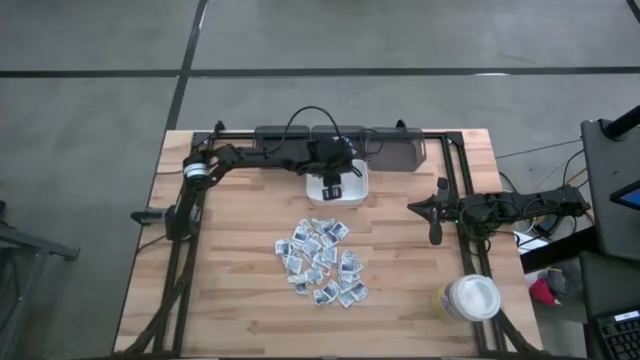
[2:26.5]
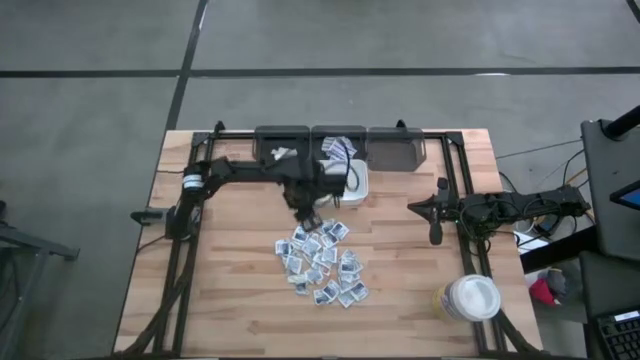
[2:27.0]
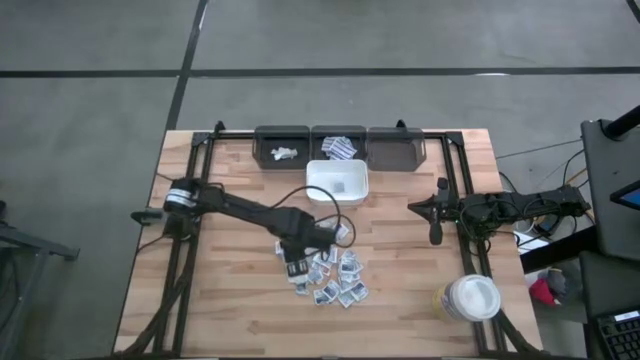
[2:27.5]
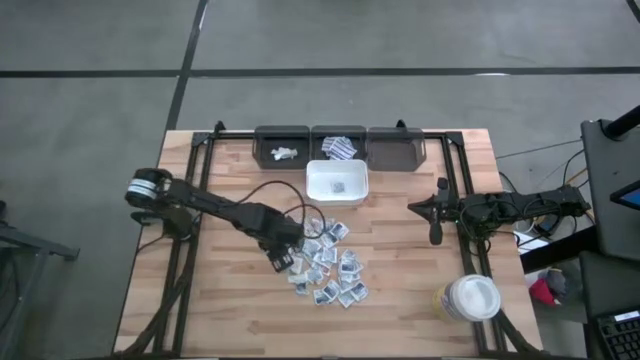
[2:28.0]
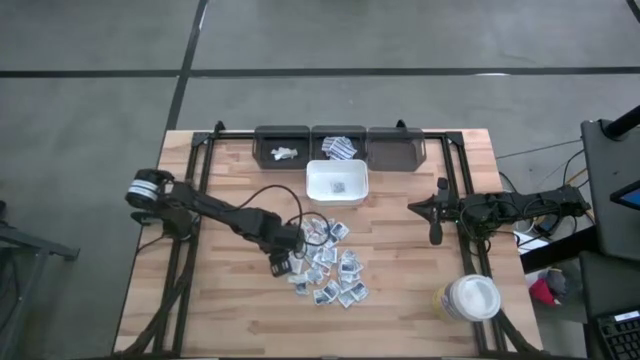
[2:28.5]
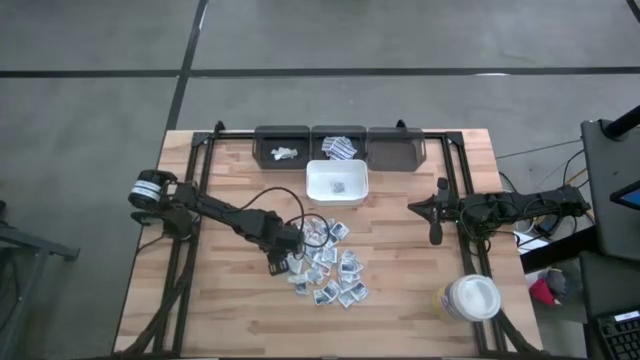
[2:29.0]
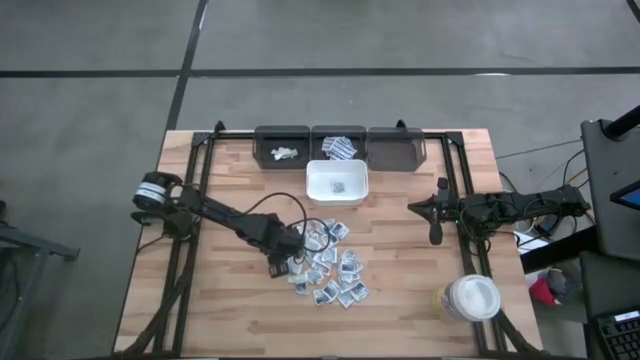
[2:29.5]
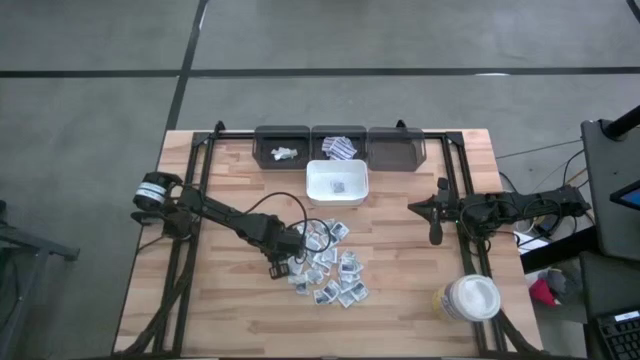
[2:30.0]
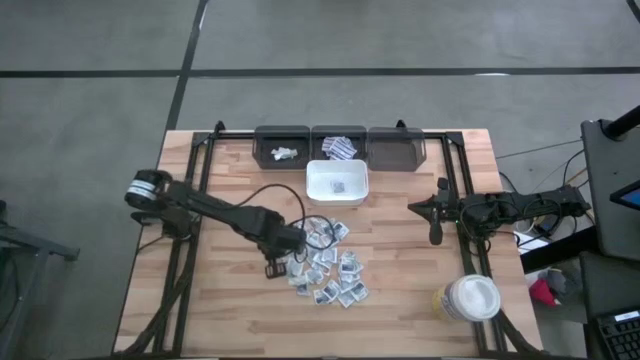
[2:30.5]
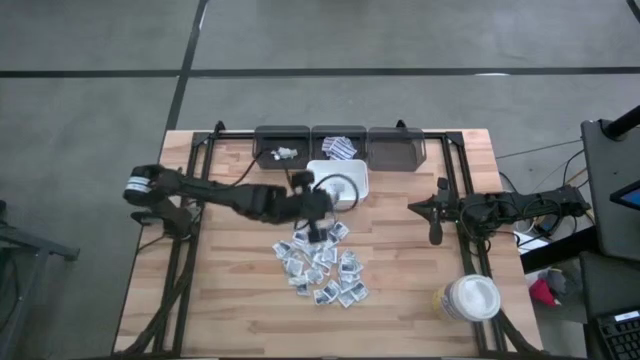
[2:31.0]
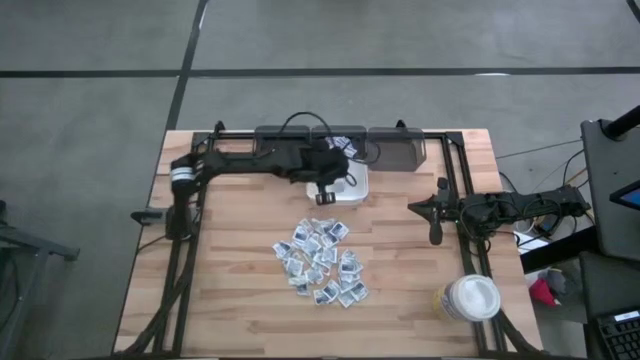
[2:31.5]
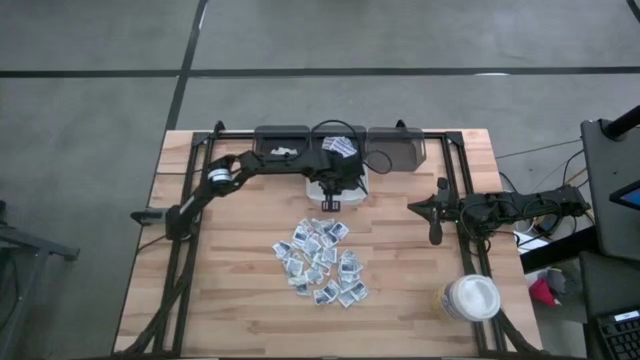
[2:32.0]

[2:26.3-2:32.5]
Task: Pick & Place First Aid Supplies
Put the blue alcohol pad into the white bin

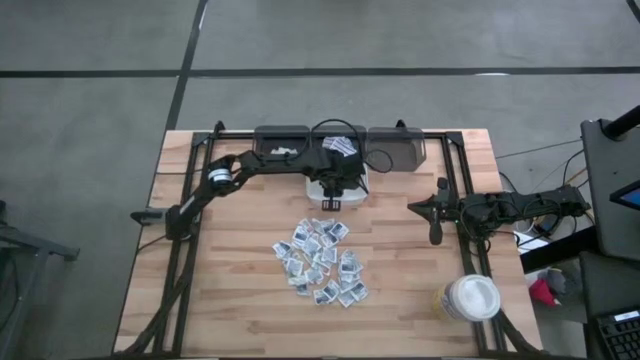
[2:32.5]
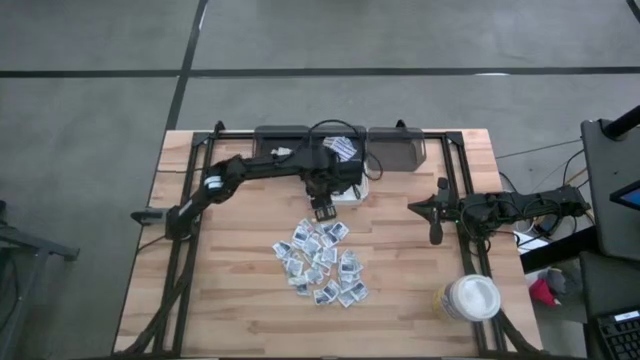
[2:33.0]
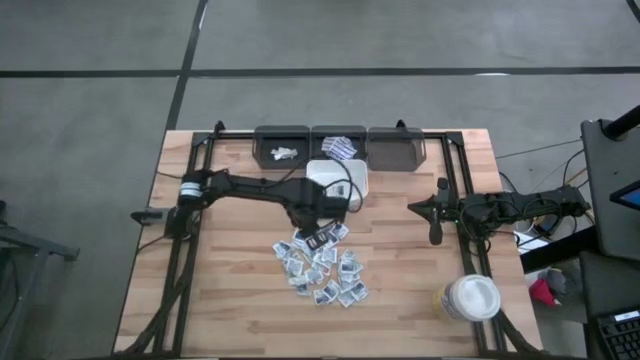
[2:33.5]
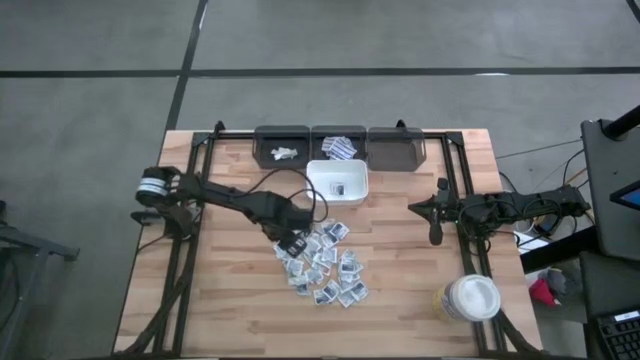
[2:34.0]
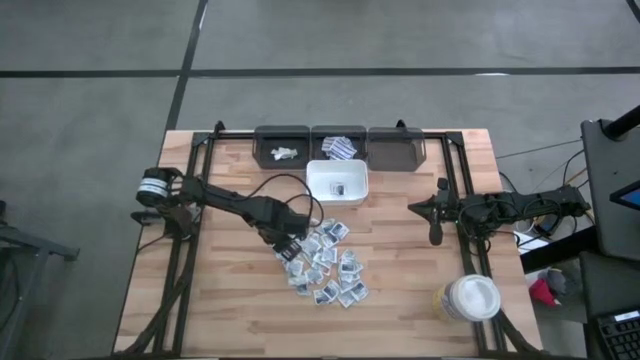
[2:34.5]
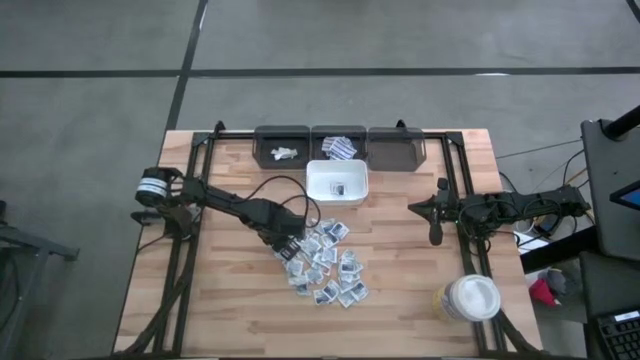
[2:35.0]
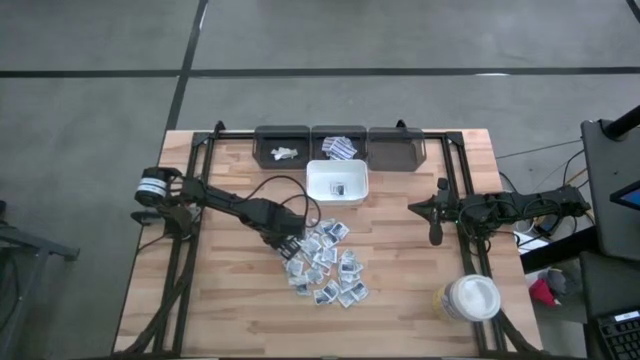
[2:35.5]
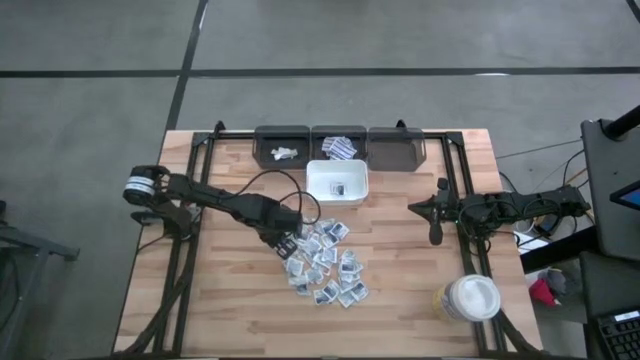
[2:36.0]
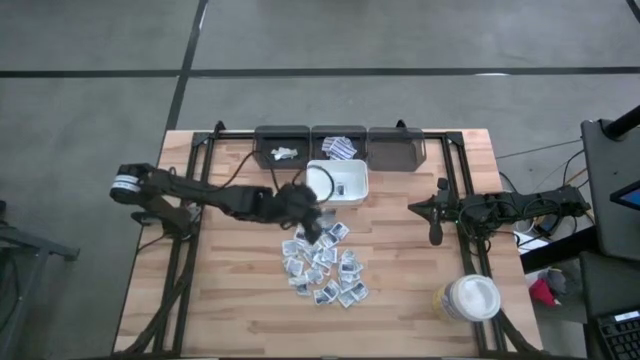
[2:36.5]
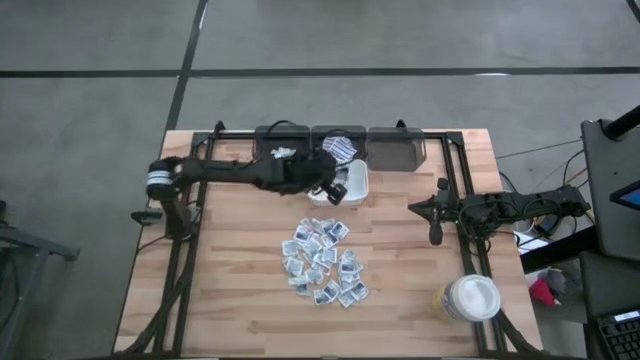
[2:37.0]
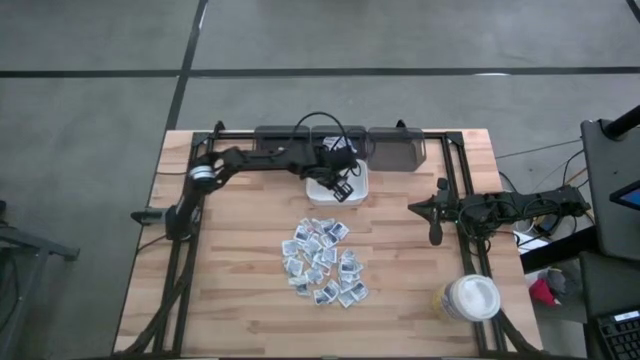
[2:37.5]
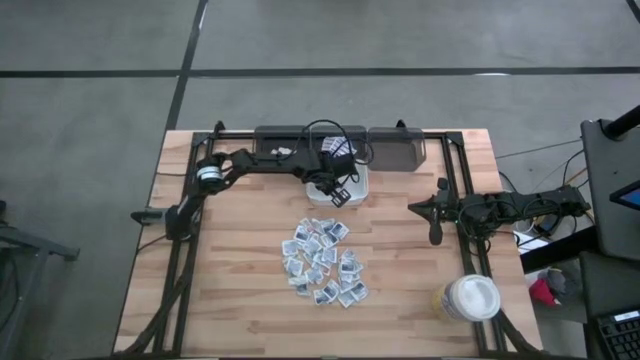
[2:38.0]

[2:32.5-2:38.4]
Put the blue alcohol pad into the white bin

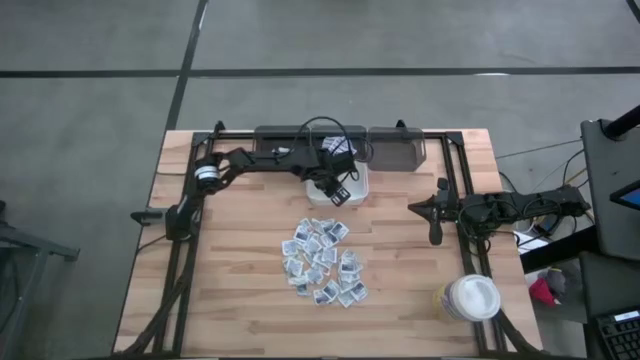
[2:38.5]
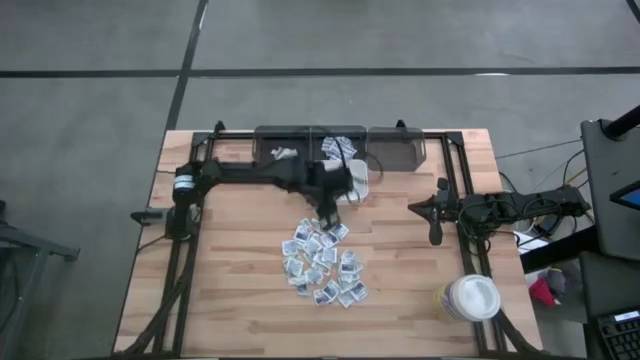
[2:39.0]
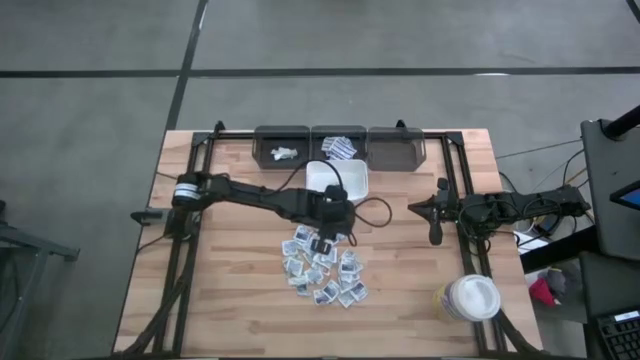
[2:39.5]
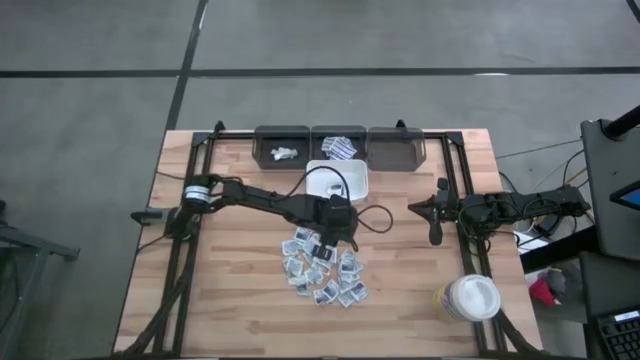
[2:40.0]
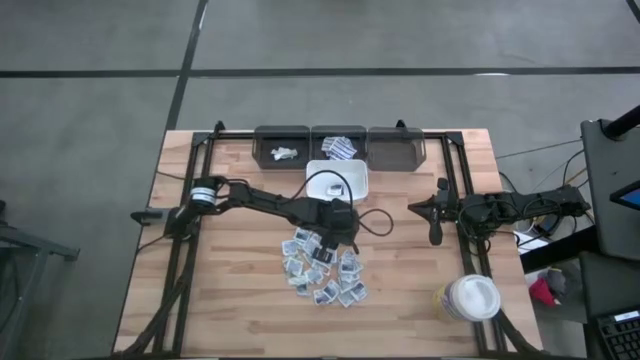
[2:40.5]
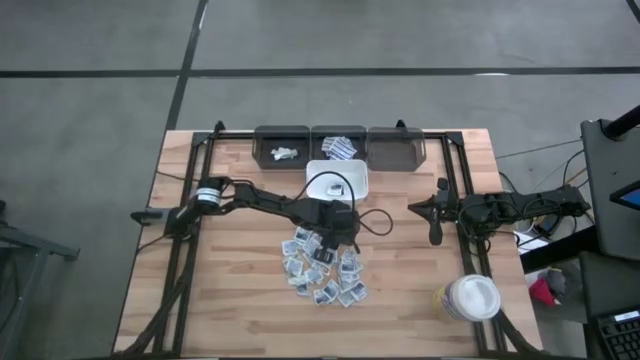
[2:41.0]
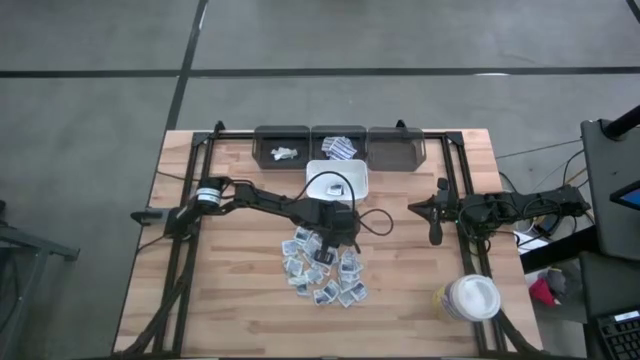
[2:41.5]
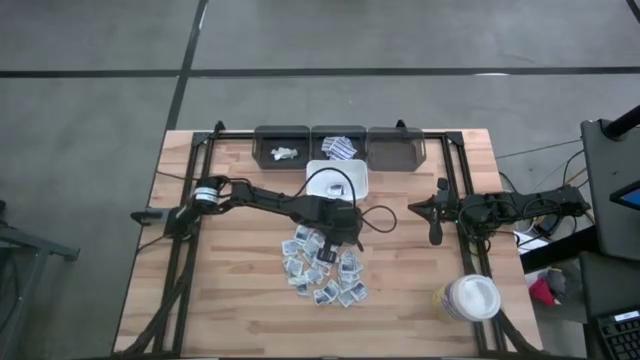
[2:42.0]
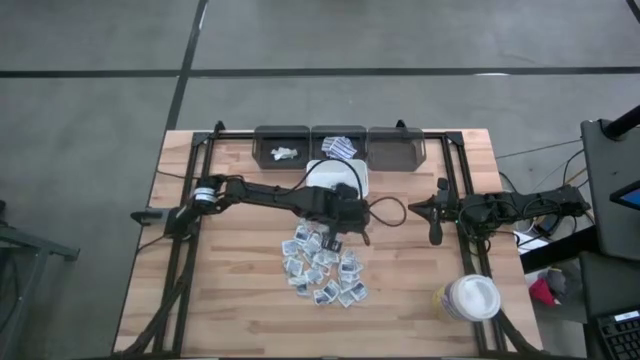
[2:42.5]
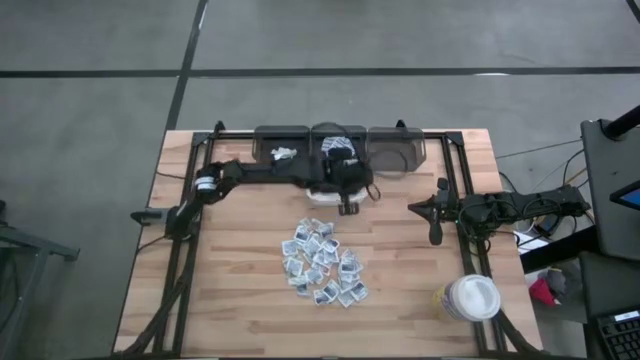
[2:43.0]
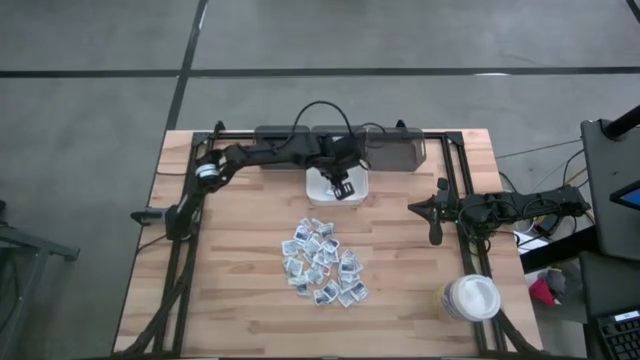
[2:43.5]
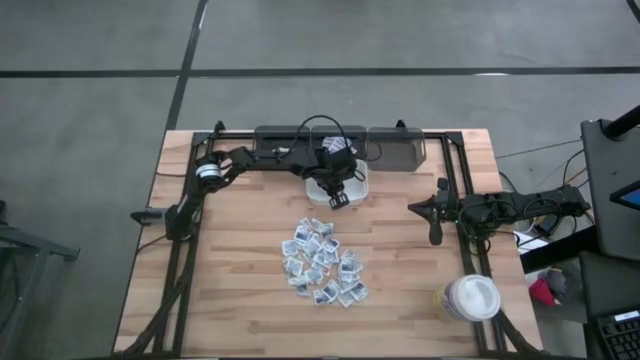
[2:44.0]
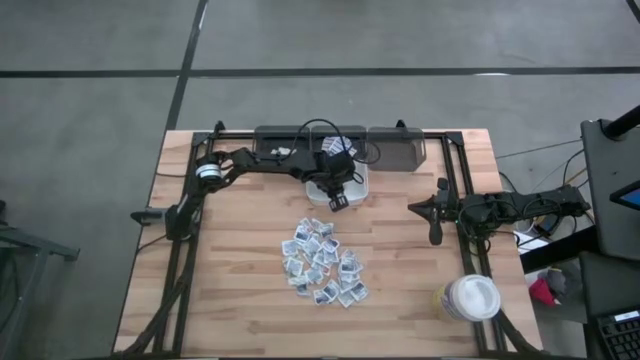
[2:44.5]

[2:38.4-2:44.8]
Put the blue alcohol pad into the white bin

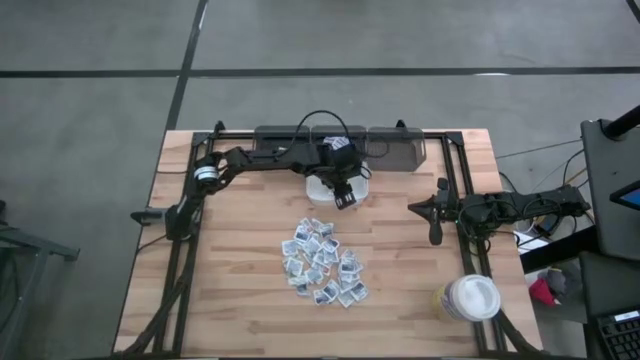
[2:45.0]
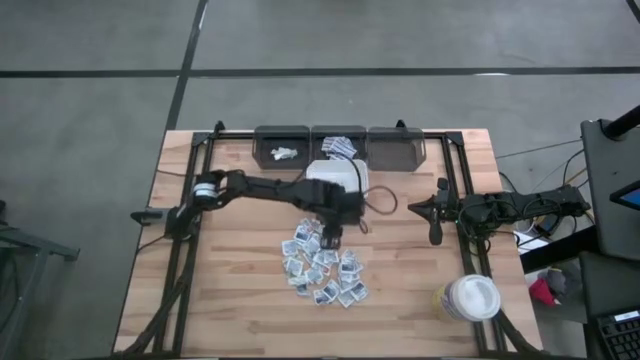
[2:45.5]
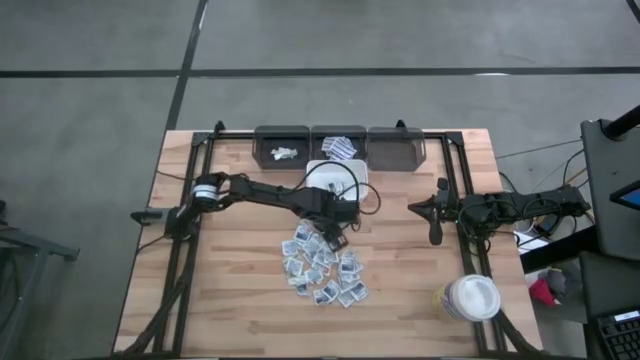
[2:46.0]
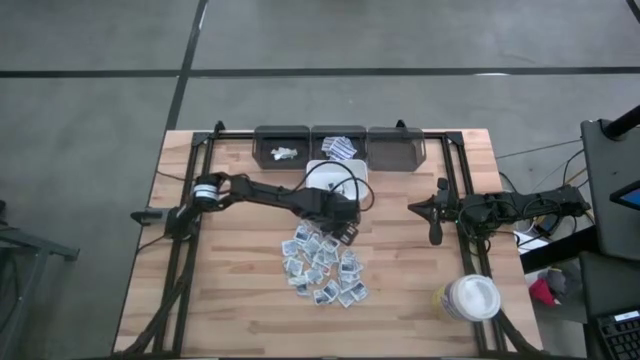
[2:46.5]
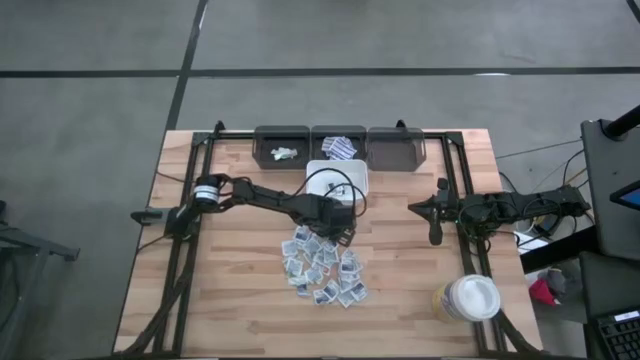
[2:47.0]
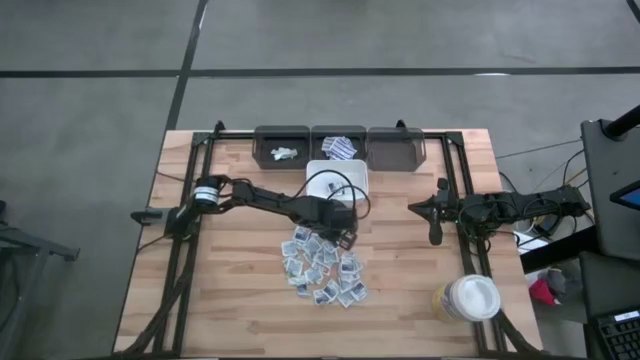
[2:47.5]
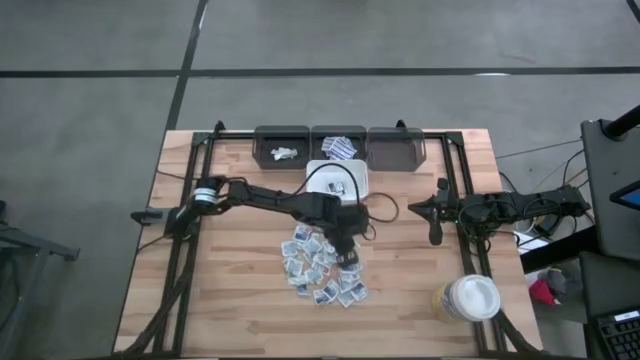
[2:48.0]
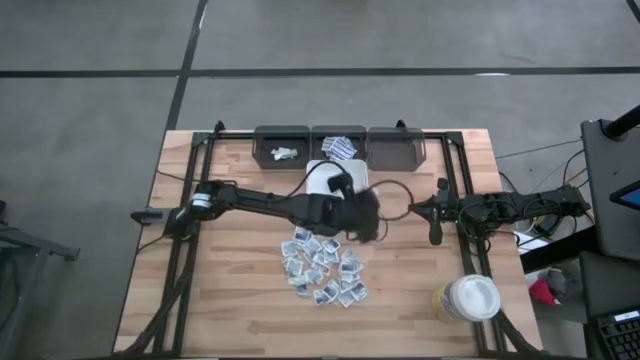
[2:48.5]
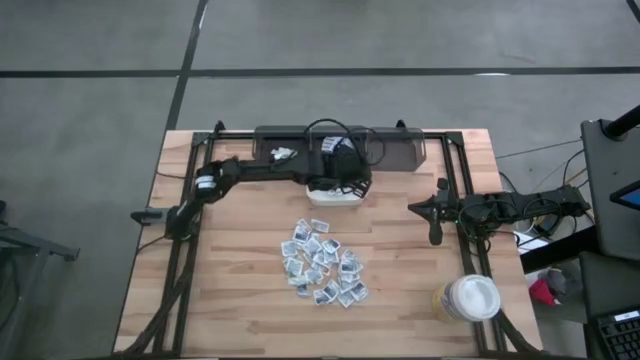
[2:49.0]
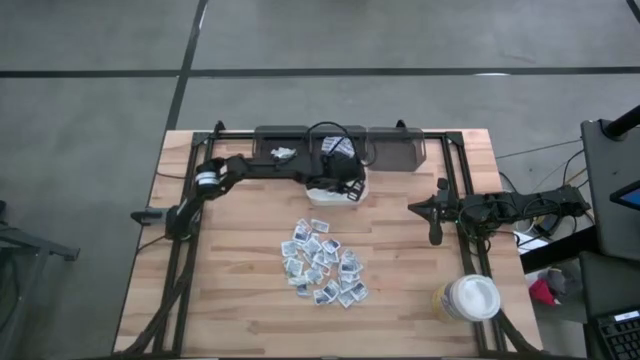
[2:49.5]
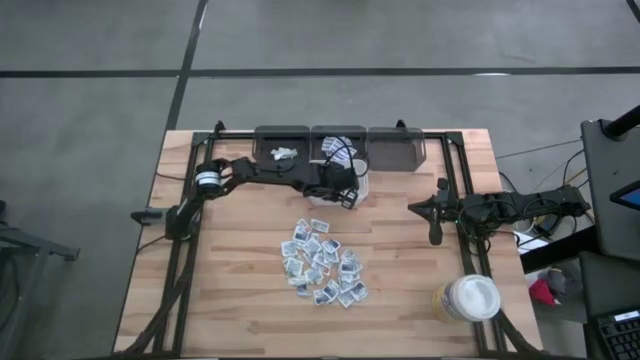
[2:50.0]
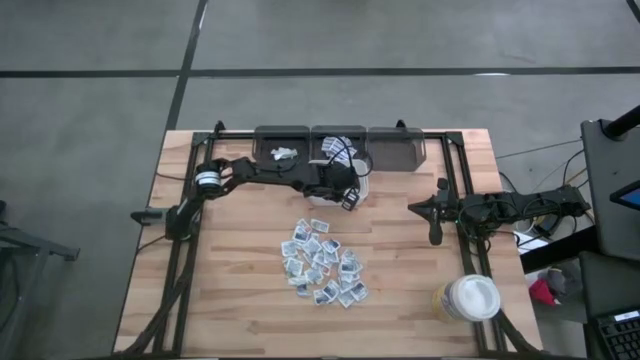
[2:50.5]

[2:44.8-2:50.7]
Put the blue alcohol pad into the white bin
